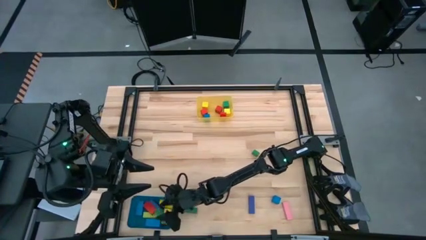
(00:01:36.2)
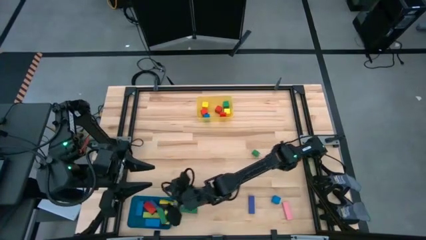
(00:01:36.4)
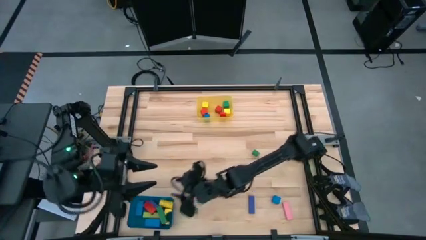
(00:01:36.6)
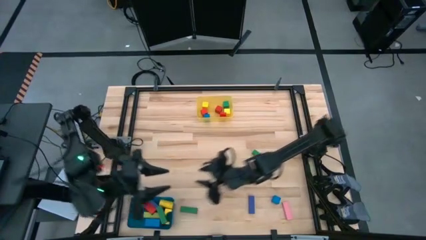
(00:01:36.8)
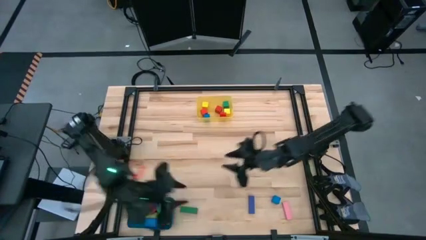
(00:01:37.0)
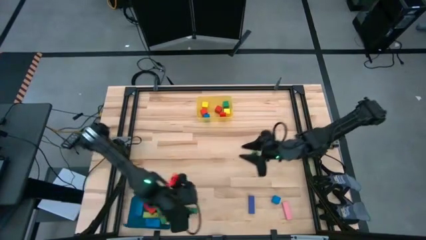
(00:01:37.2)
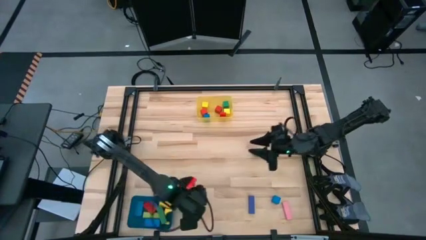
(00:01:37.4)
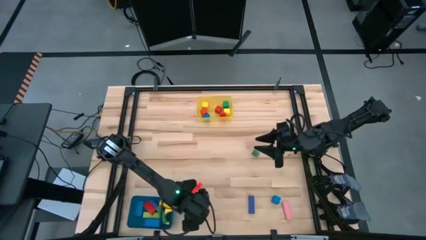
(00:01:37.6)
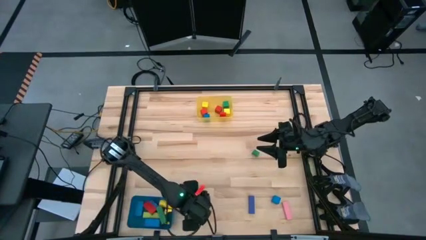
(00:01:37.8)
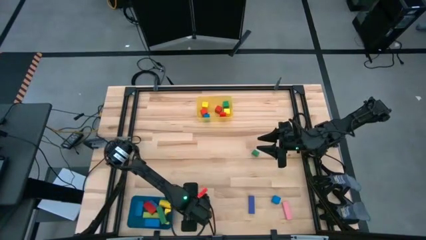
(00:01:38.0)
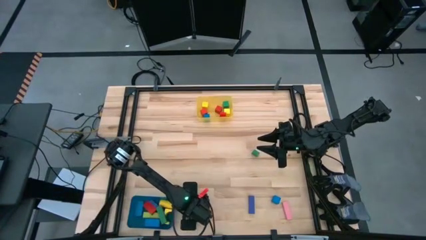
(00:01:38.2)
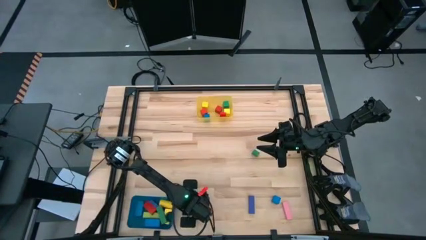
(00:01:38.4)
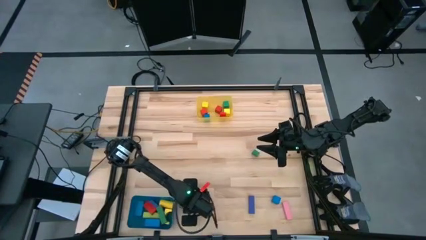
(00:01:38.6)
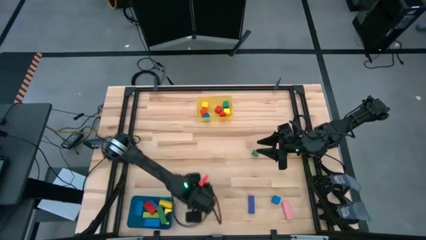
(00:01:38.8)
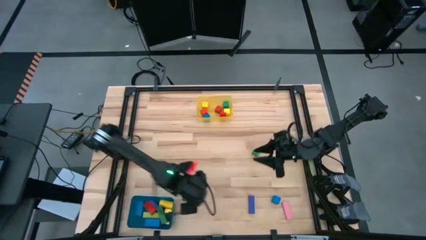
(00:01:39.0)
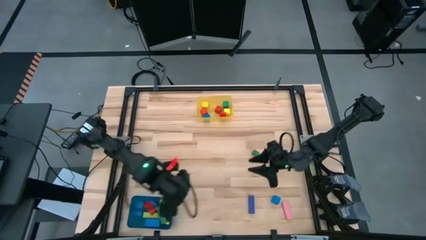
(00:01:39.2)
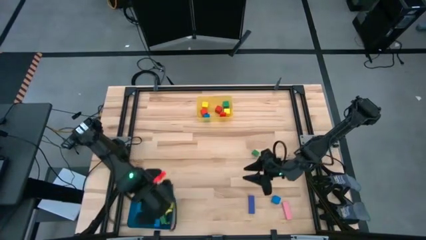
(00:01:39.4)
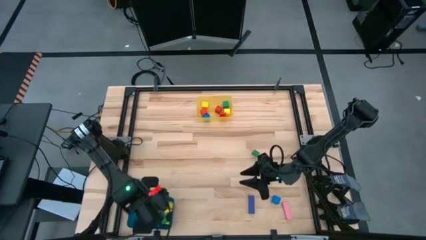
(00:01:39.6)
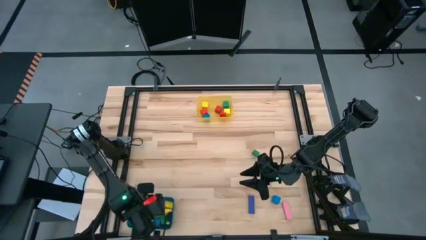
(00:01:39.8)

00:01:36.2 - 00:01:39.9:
Task: Sort blocks by size
Put the green rectangular block into the blue bin

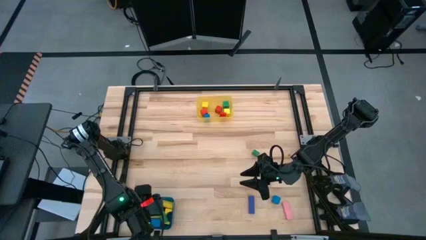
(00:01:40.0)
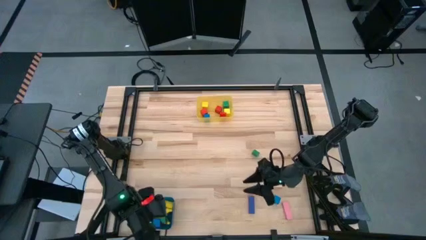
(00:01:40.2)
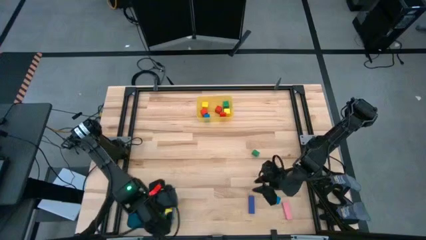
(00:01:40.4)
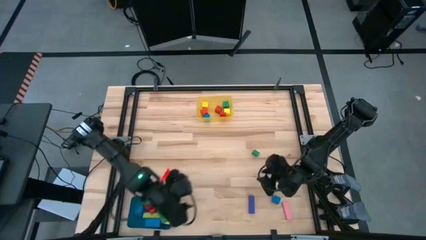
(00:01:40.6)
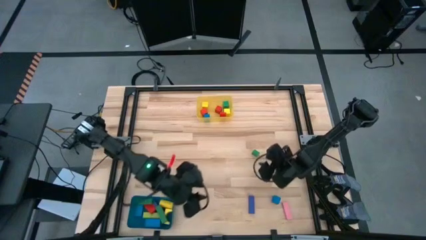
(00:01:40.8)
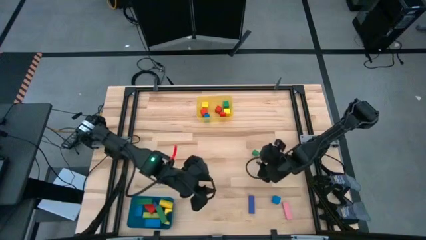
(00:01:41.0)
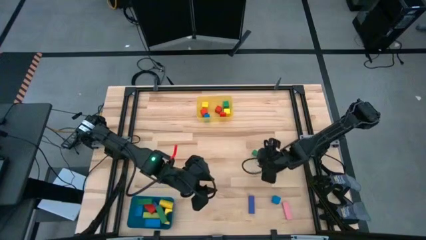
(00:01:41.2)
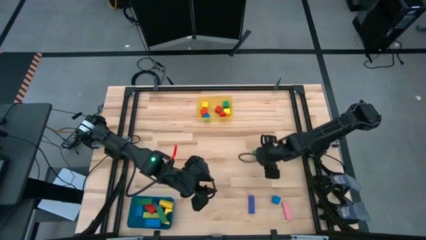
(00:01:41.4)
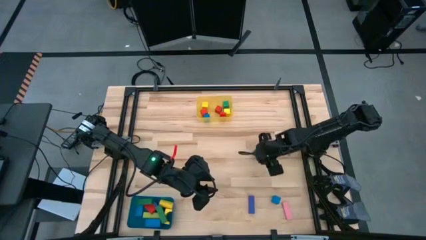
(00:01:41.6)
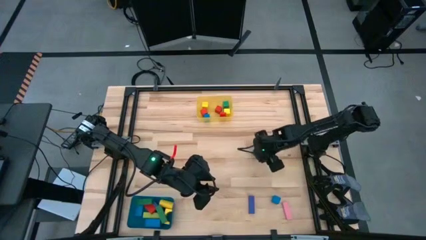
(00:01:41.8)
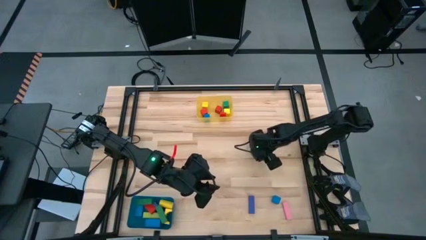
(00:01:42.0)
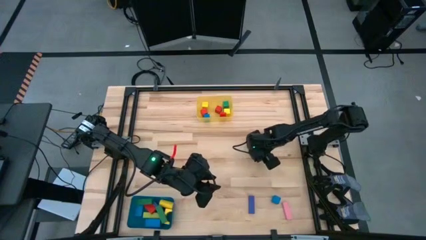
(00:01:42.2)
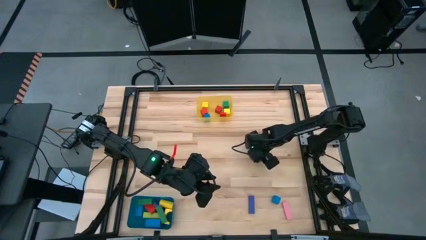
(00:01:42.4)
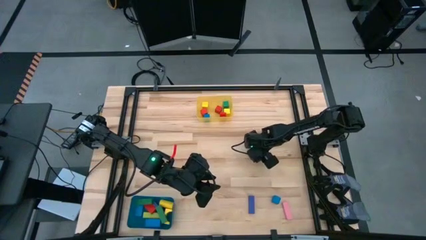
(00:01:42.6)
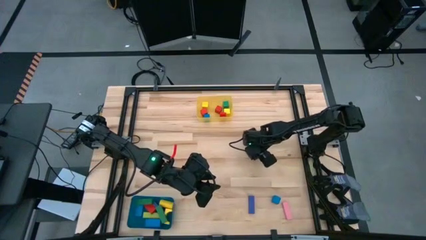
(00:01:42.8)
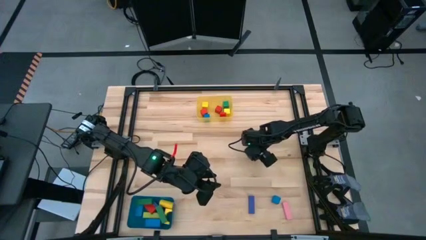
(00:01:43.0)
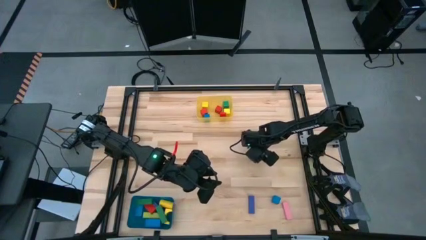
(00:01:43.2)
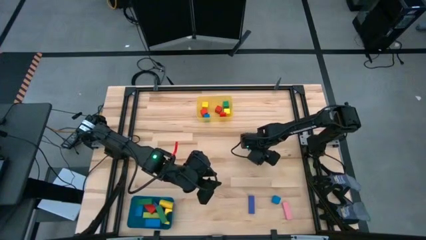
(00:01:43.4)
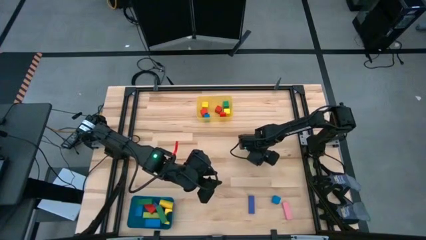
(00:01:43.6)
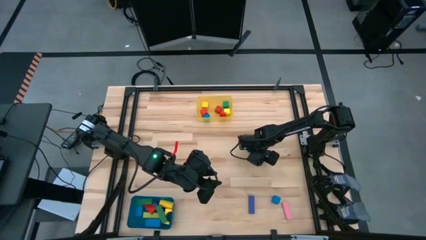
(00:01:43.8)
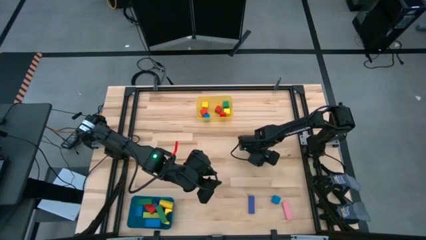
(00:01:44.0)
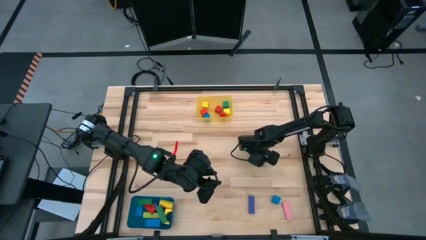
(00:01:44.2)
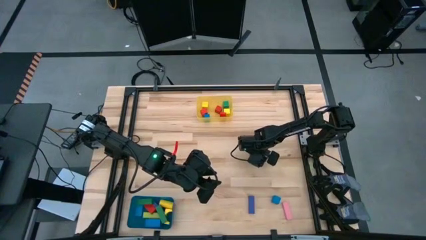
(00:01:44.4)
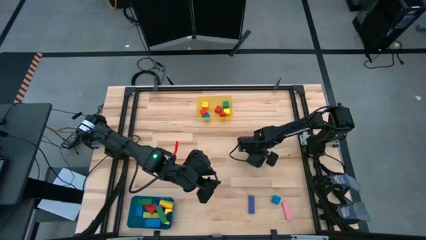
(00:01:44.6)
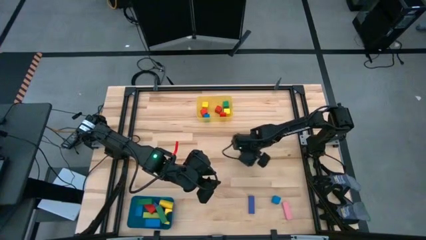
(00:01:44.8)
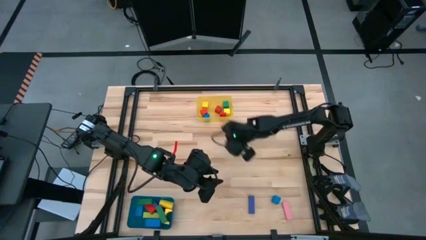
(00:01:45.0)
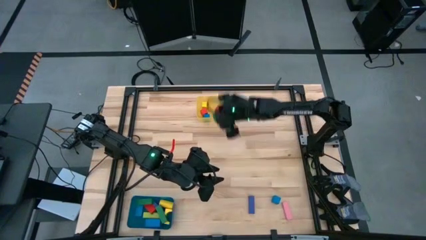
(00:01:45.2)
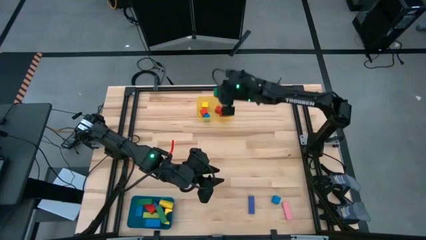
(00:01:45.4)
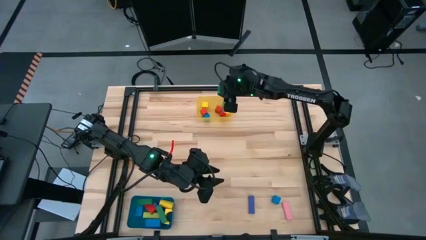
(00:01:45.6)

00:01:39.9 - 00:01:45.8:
Put the green triangular block into the yellow bin

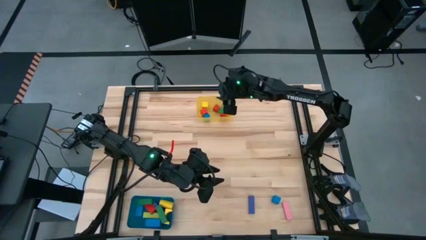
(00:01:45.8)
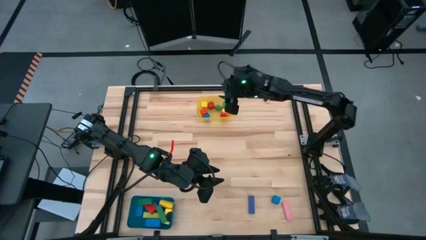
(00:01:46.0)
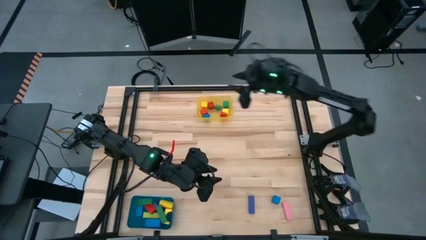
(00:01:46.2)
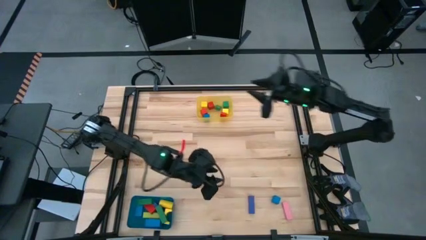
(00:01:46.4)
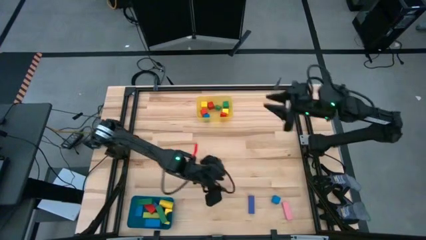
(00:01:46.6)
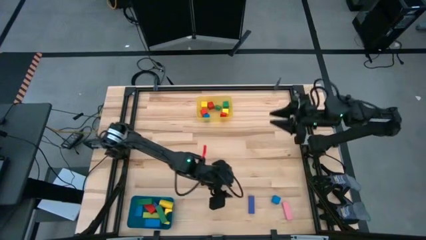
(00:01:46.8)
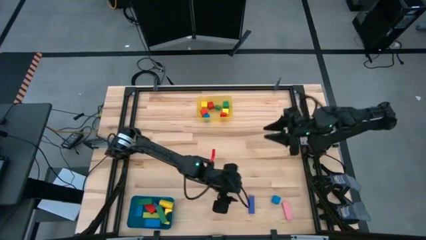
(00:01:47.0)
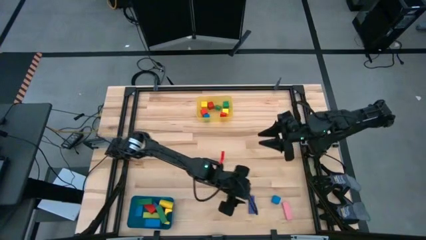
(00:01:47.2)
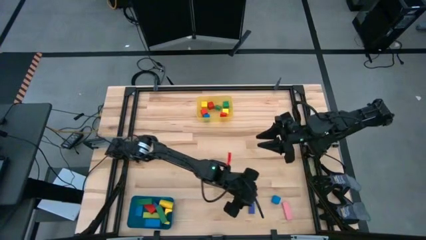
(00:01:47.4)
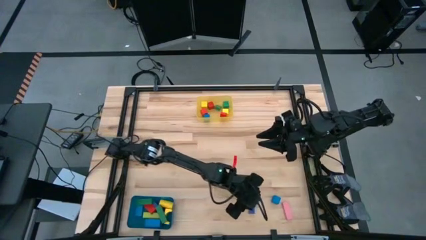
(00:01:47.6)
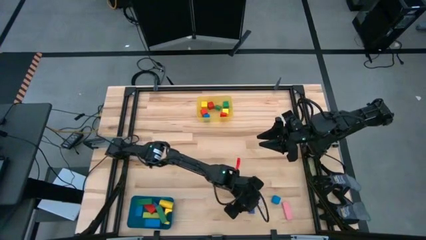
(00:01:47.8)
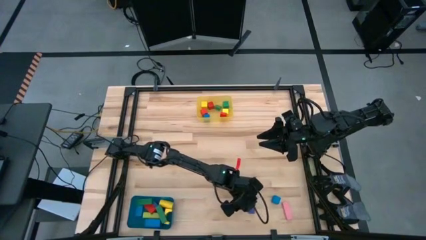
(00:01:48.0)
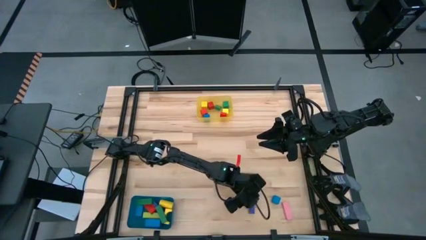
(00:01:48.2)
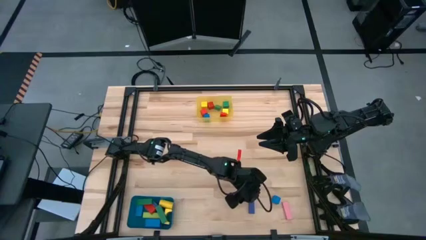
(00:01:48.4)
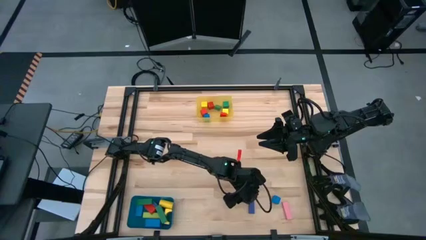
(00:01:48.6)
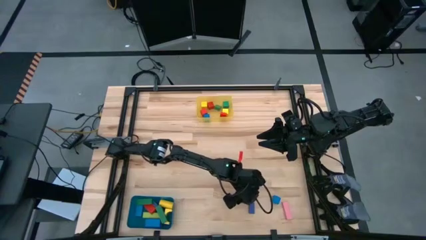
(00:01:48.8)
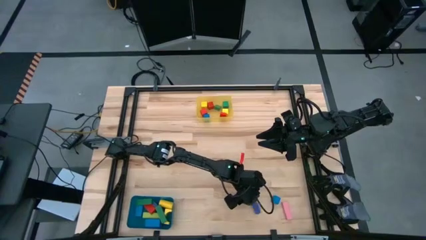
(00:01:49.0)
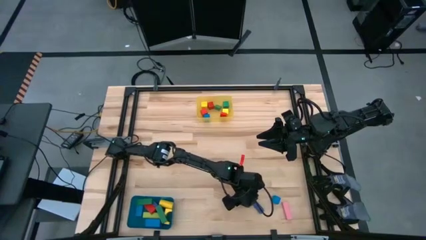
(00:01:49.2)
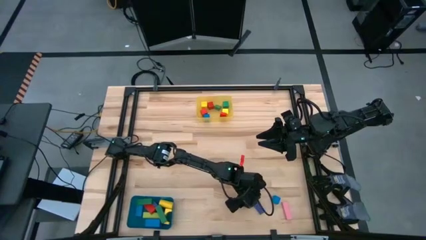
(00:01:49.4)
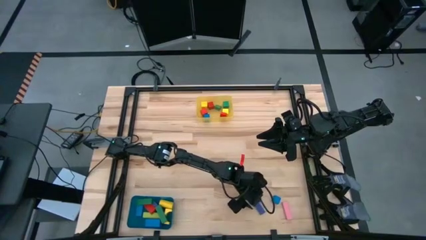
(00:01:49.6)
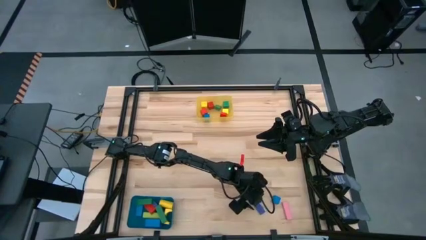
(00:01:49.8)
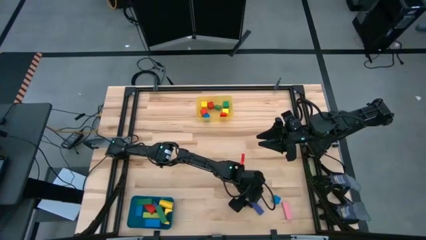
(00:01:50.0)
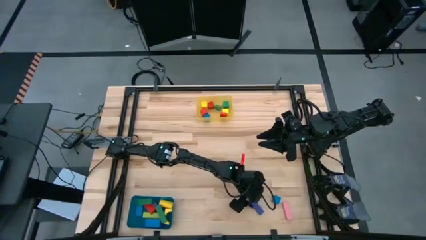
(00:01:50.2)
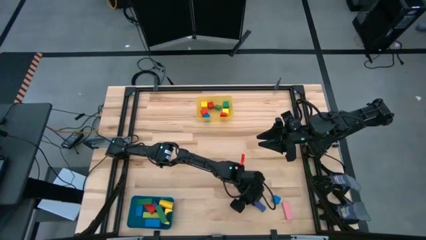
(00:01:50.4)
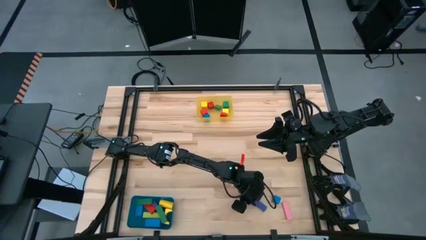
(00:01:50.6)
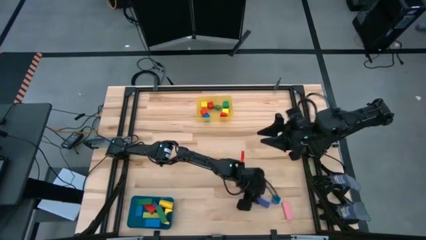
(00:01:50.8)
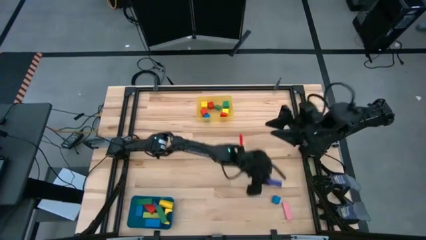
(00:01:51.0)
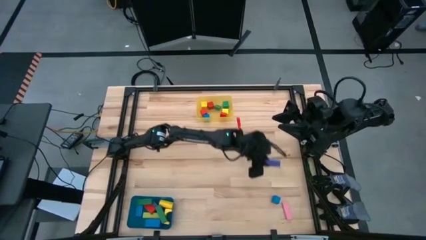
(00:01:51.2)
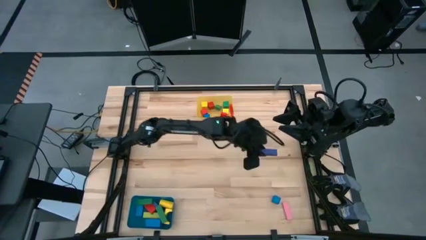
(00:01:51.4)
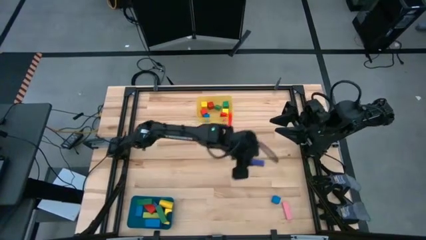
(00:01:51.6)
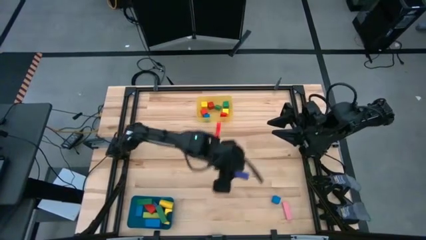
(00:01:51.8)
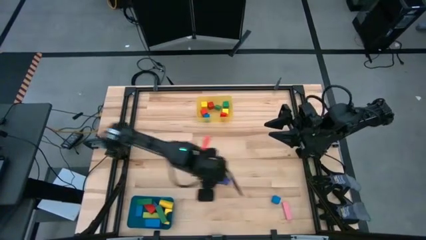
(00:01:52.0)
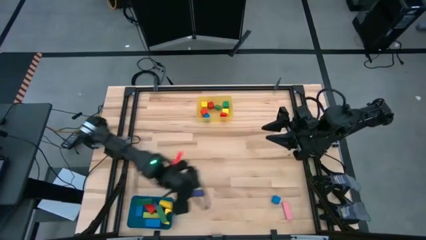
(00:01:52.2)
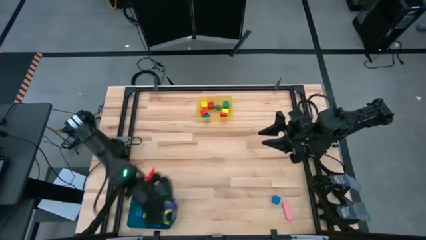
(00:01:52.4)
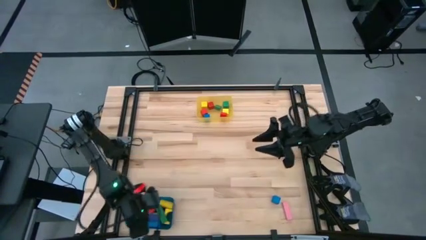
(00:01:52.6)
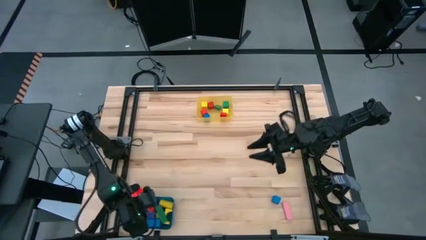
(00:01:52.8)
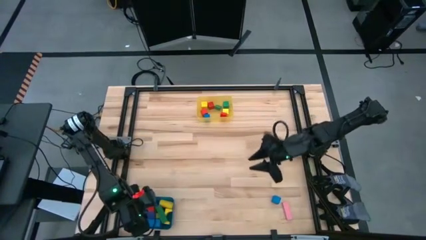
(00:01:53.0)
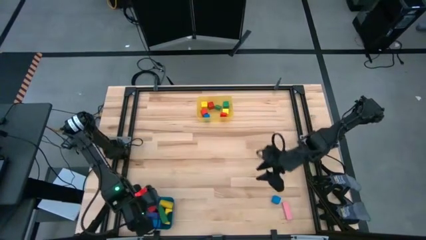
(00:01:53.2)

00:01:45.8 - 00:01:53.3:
Put the violet rectangular block into the blue bin
